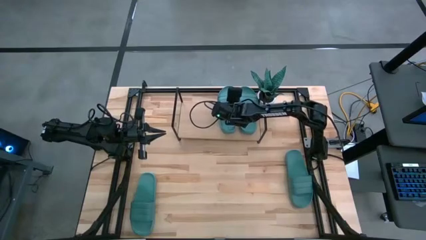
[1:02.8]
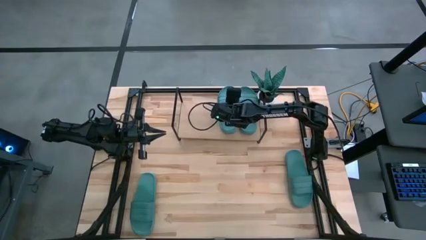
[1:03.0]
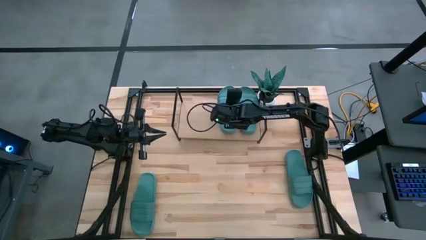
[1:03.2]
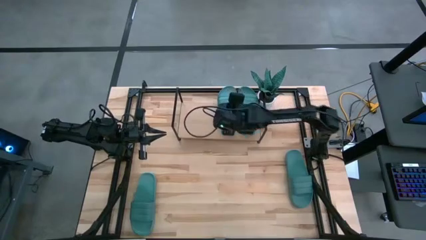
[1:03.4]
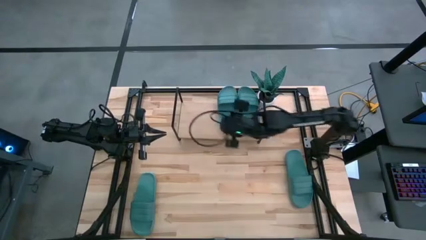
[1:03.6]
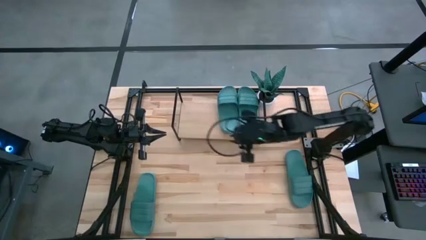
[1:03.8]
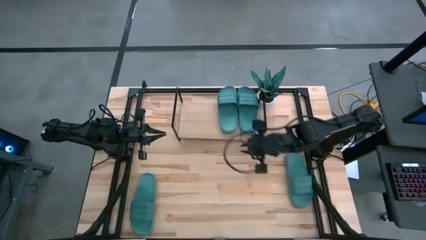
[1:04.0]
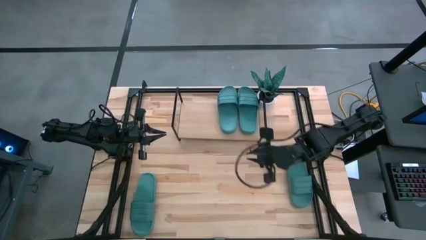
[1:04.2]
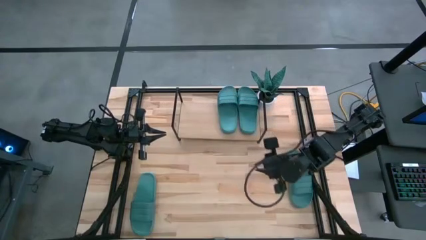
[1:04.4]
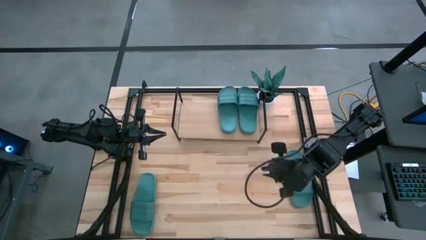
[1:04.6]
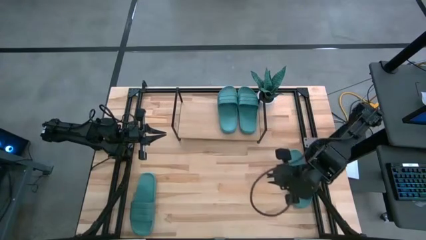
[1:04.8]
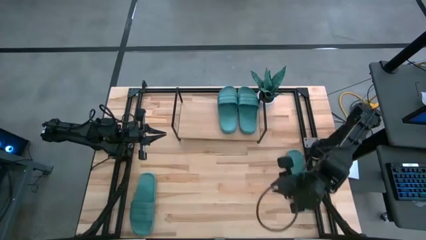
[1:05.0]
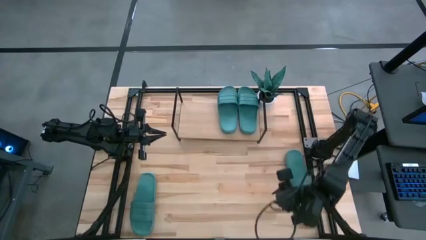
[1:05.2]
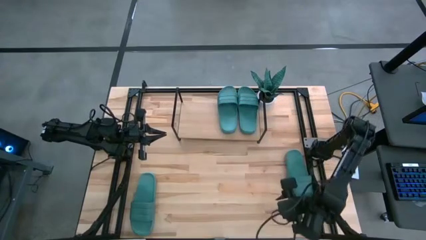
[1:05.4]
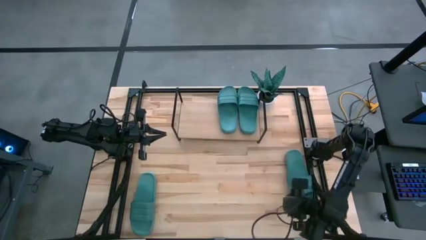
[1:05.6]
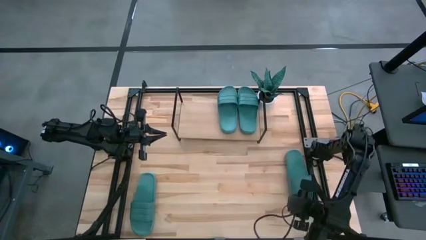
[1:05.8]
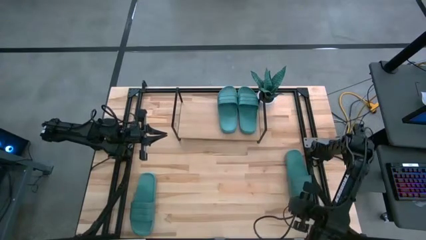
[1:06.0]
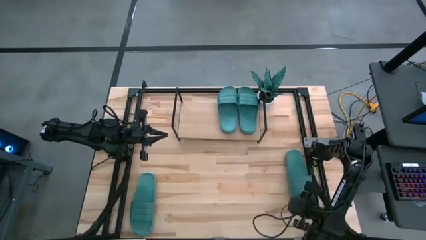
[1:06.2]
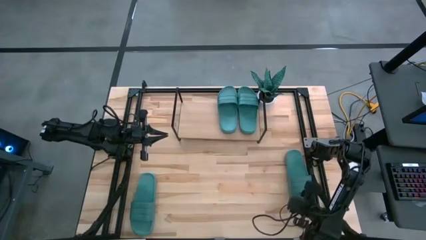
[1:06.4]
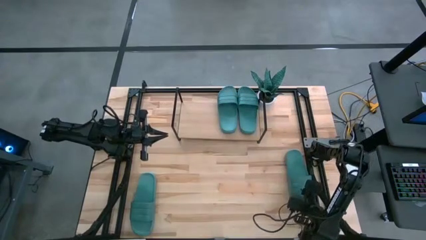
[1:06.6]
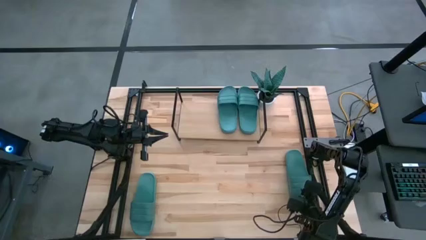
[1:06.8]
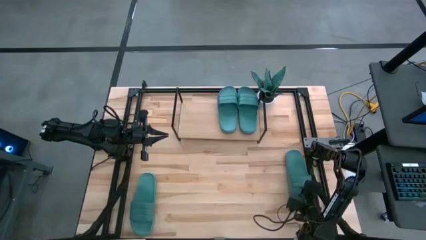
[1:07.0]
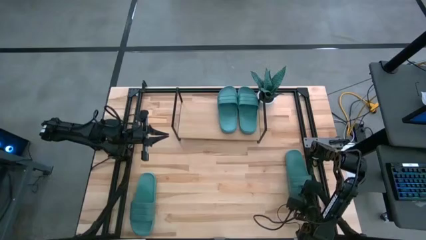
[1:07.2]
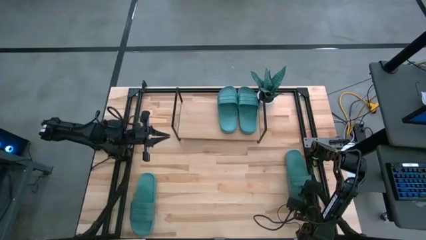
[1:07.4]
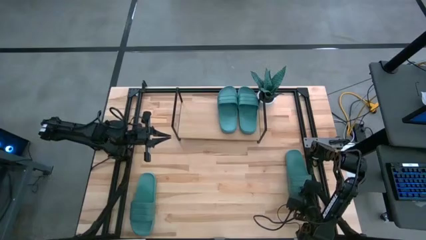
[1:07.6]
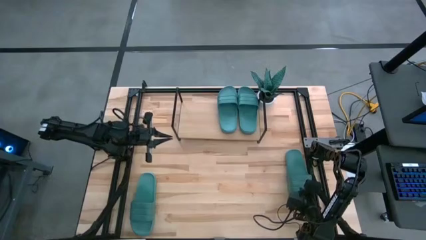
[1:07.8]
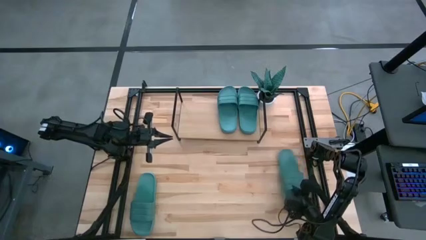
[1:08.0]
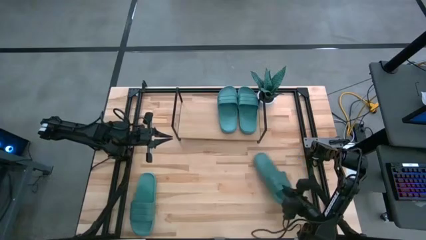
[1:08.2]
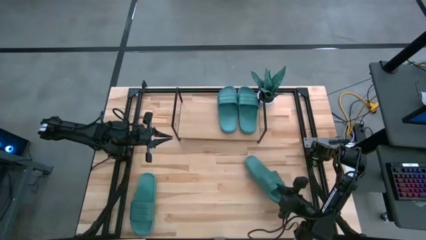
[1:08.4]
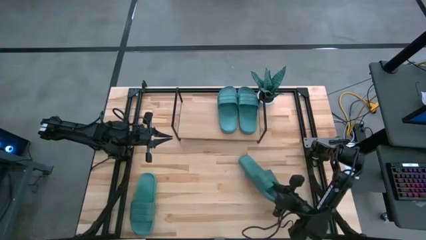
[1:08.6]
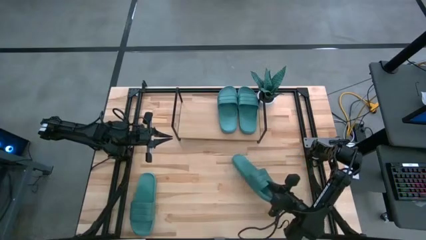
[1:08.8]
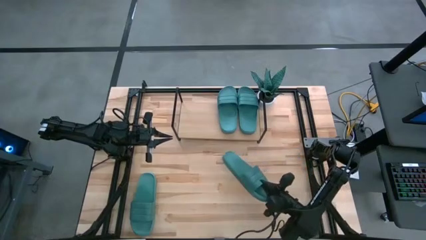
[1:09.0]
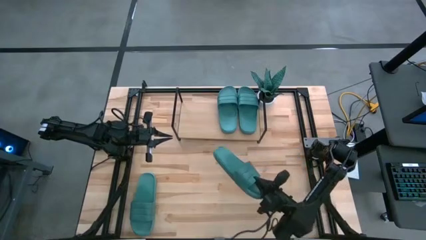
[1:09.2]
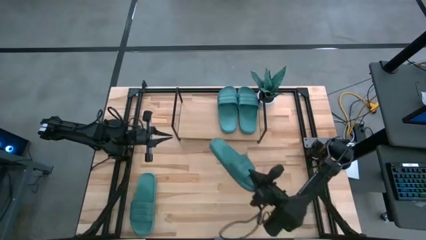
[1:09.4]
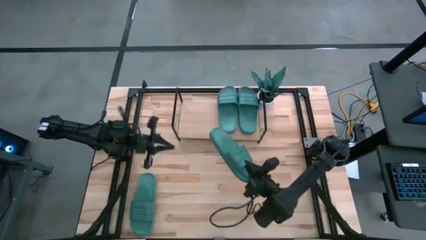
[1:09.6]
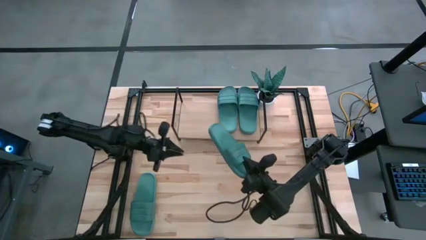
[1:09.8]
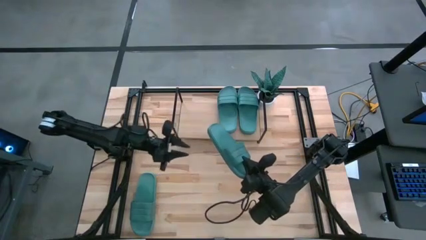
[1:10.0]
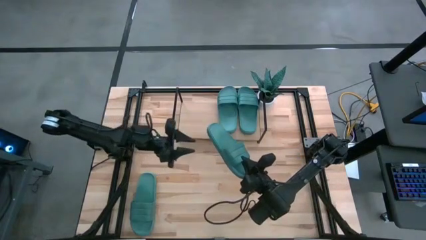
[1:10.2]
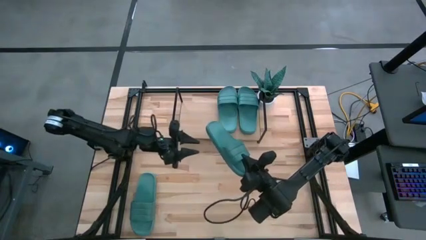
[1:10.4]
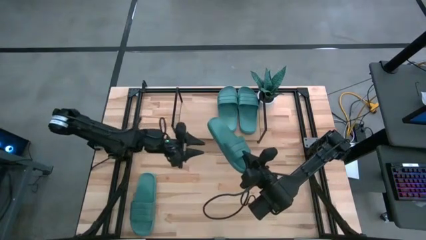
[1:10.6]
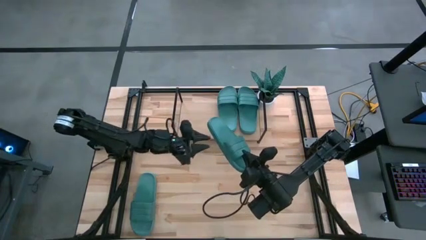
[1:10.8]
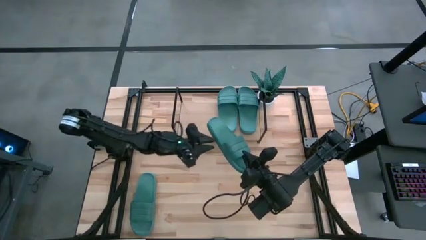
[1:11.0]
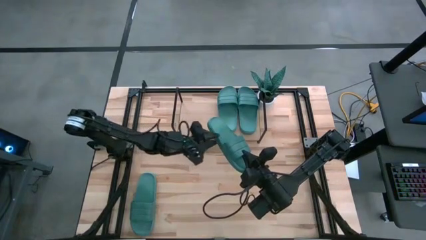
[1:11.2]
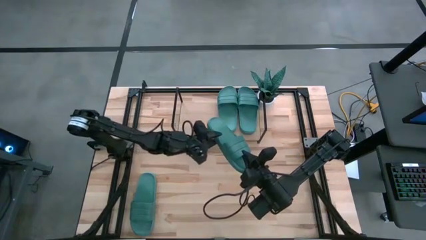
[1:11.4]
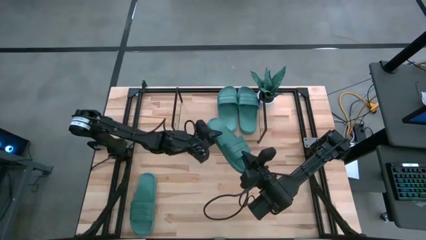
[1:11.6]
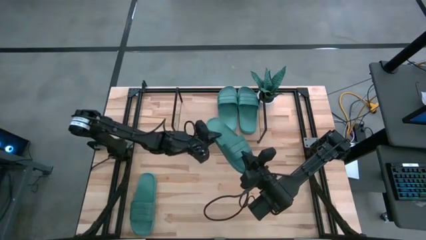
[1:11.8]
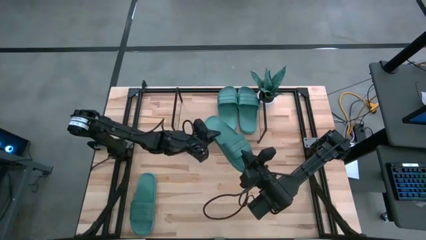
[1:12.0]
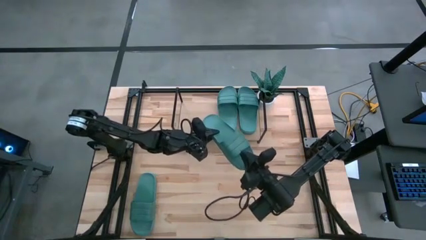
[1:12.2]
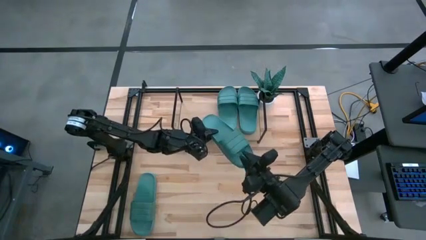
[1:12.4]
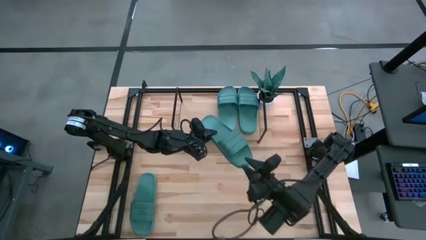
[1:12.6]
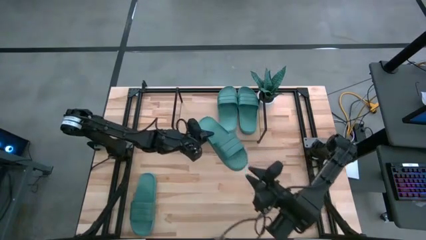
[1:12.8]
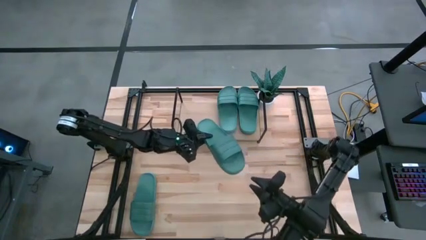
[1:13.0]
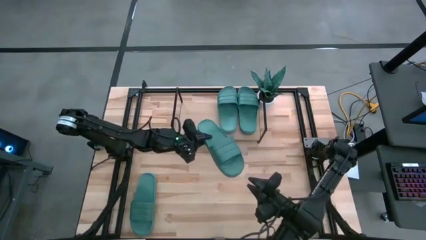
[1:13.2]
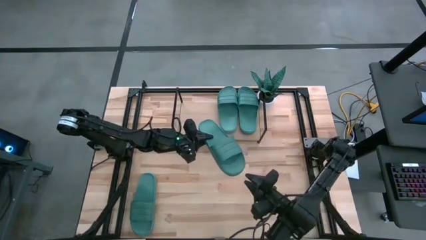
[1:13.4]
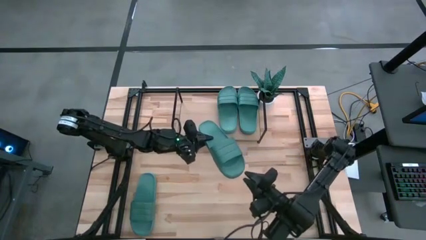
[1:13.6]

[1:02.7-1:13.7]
Task: Pick and place slides into the shelf
Put the green slipper on the shelf
